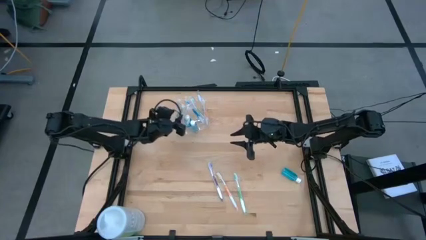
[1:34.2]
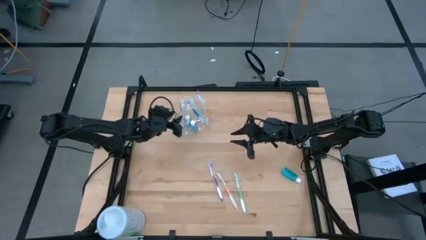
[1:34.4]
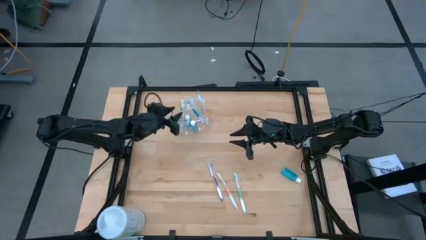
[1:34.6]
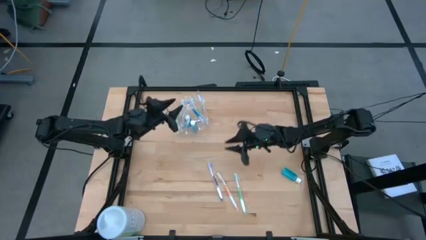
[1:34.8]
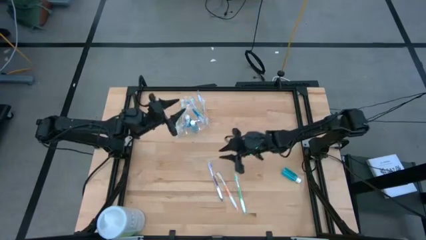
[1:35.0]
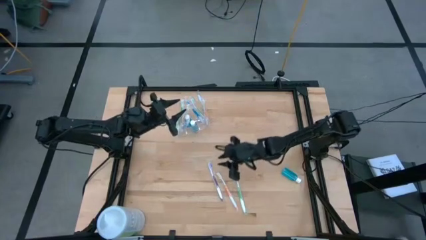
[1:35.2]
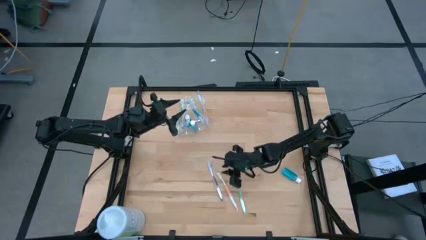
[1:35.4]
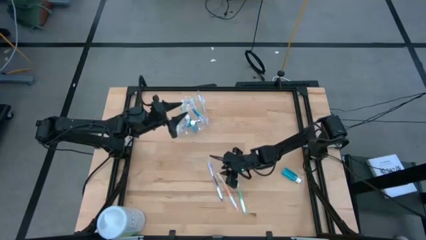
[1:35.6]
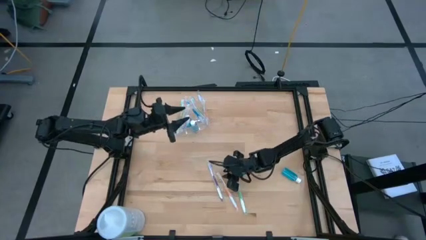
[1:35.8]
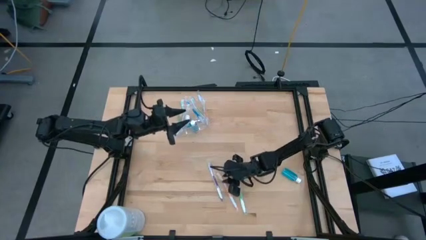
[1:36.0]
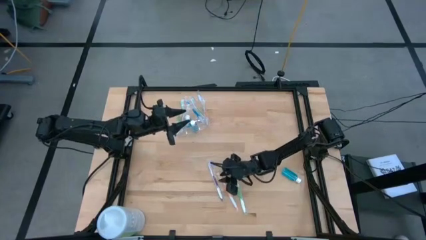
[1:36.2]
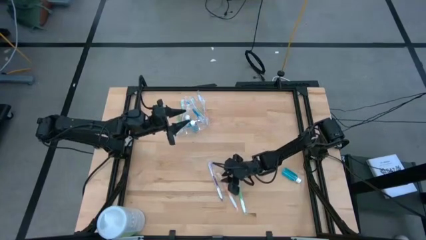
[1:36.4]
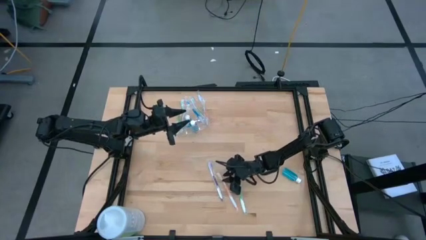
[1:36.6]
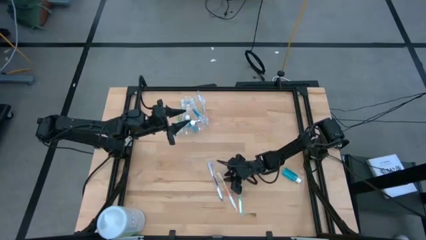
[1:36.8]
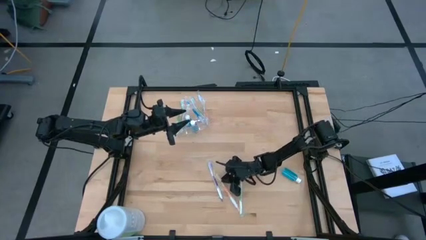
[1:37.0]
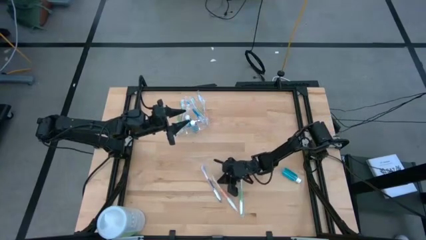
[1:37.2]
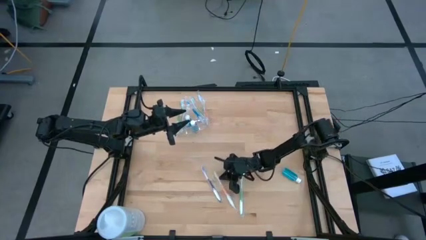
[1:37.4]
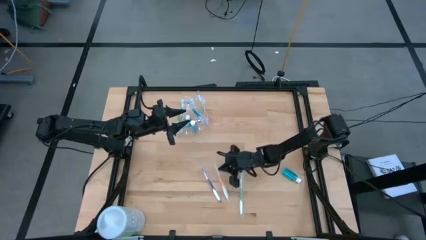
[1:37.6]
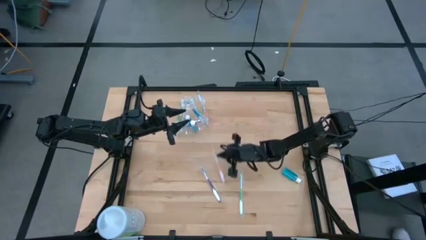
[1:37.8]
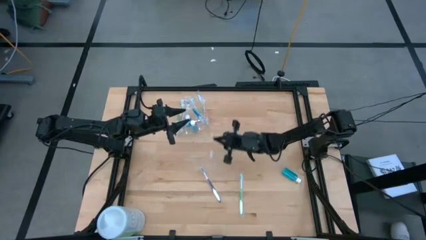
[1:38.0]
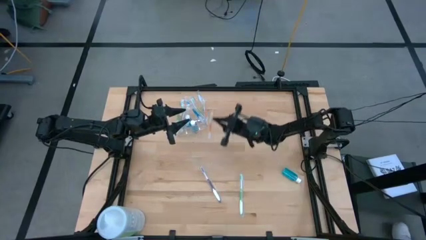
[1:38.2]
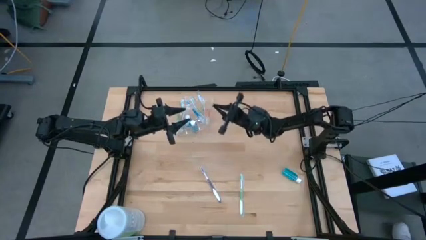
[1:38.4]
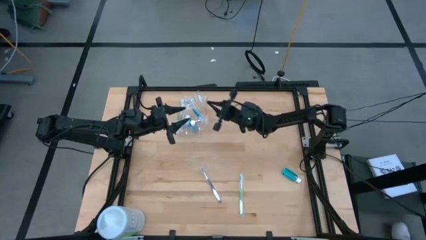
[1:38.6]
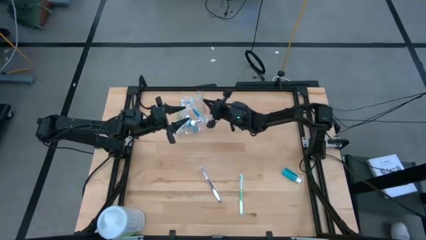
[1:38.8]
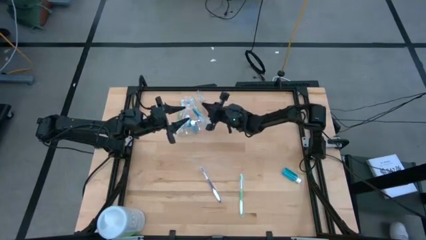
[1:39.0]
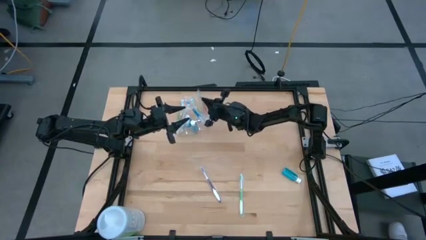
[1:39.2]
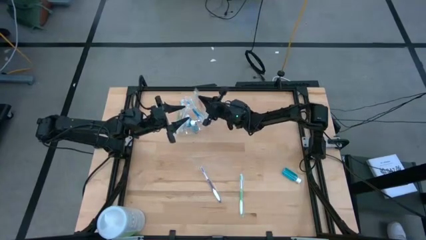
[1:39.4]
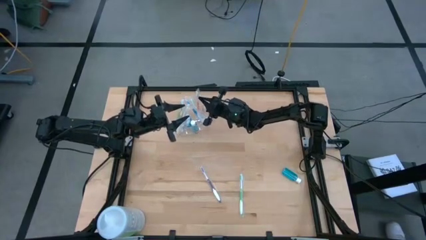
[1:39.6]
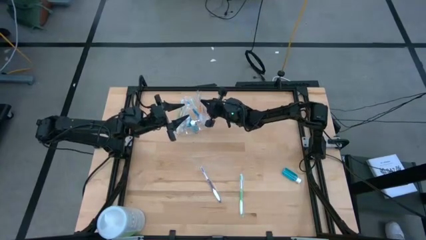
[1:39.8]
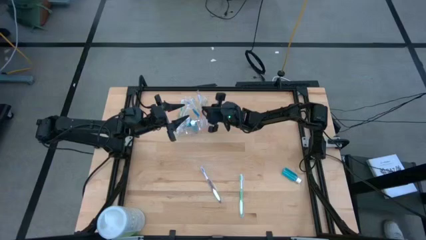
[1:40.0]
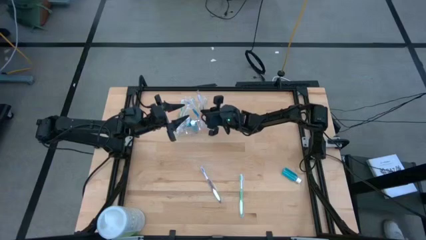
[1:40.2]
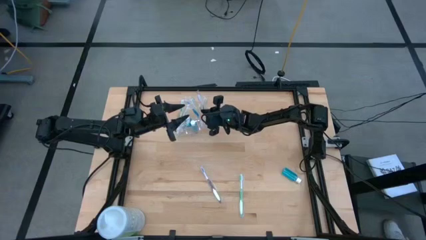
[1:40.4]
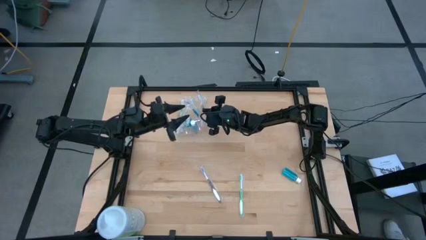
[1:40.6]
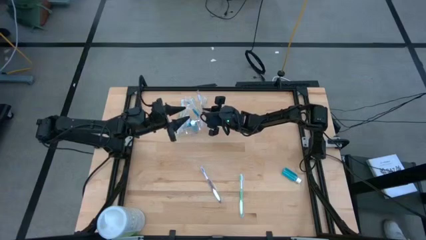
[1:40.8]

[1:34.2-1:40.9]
Task: Pick & Place toothbrushing station
Put the orange toothbrush into the transparent organizer

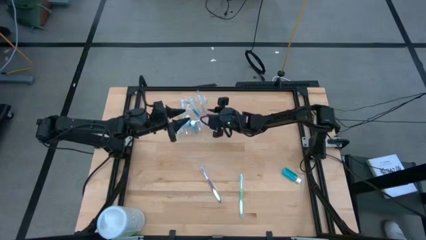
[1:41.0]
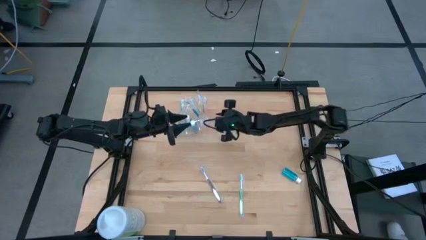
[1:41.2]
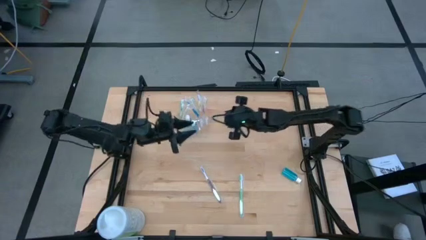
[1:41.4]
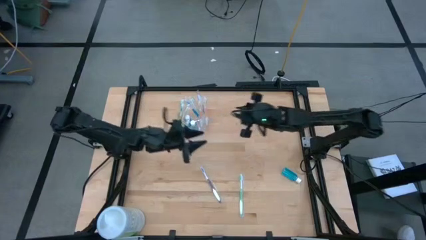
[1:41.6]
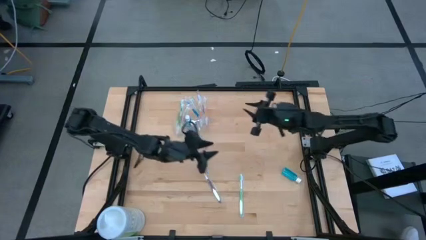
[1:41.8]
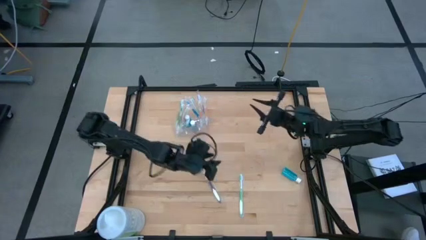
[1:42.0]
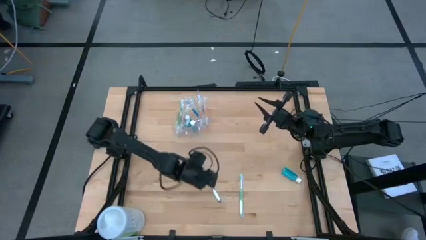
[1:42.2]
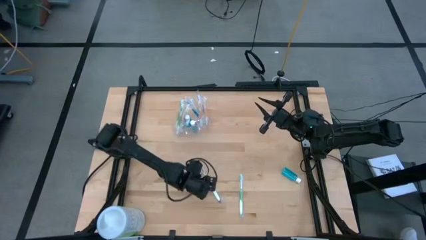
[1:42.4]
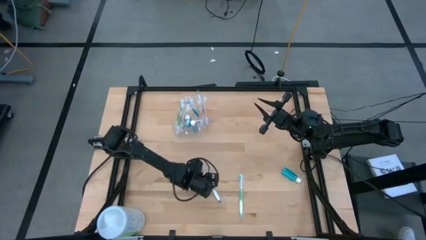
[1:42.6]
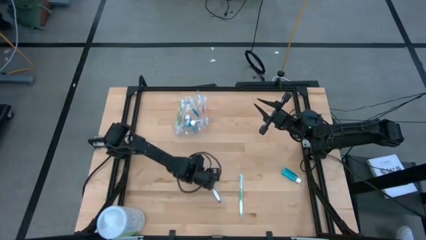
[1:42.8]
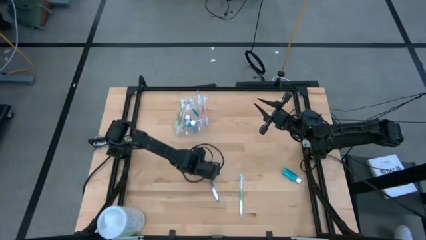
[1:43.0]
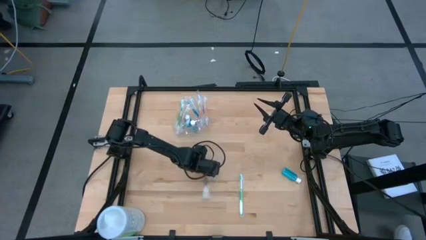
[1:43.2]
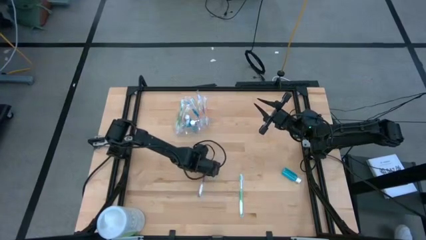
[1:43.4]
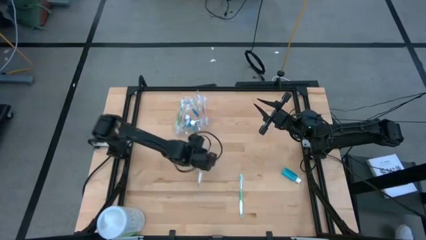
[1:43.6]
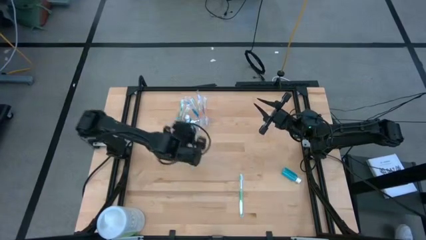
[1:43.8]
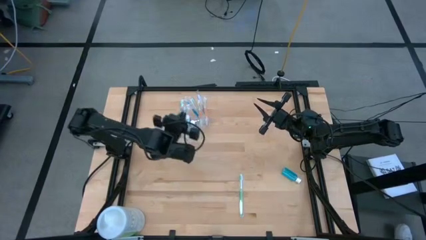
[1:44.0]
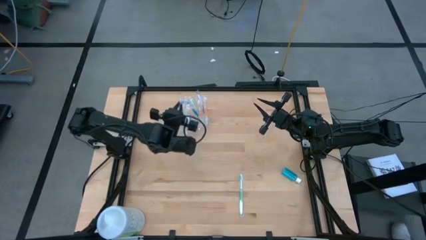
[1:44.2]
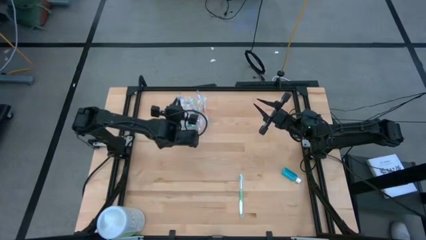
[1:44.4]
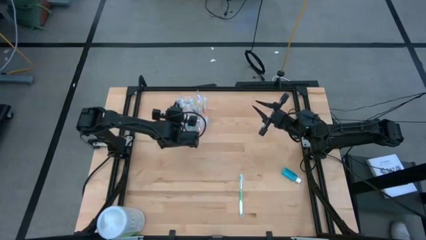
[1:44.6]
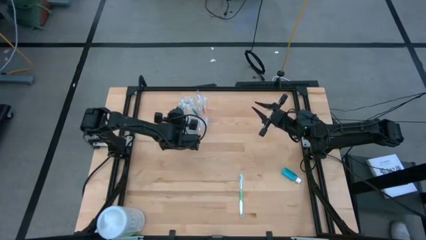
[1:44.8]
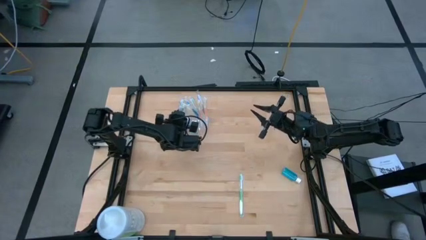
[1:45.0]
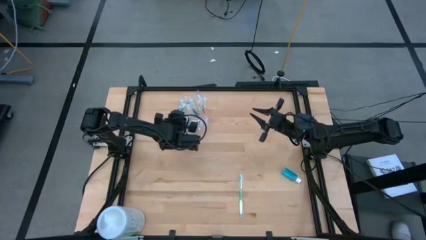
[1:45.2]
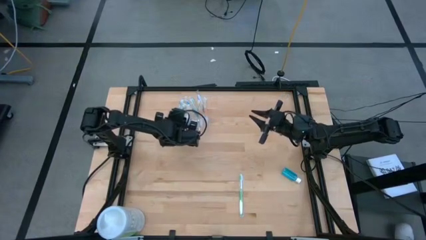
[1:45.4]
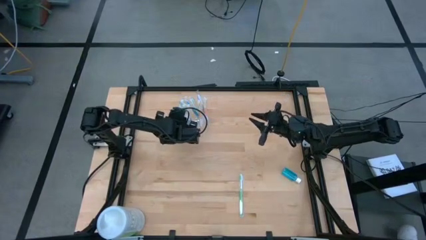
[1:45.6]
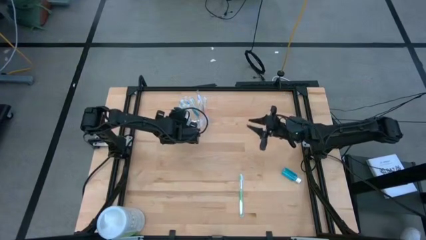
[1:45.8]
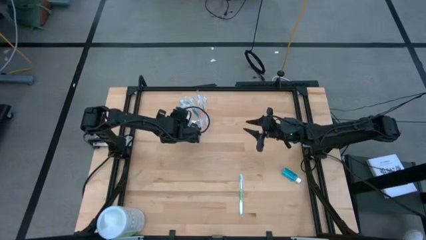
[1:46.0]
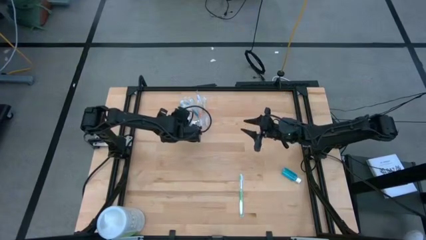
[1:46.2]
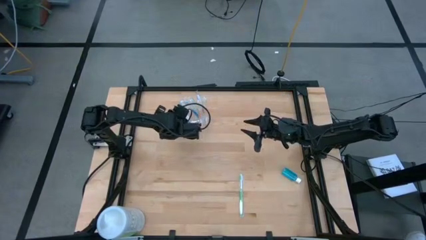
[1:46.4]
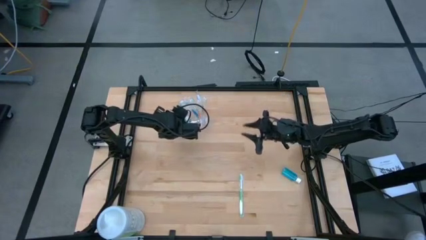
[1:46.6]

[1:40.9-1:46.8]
Put the violet toothbrush into the transparent organizer

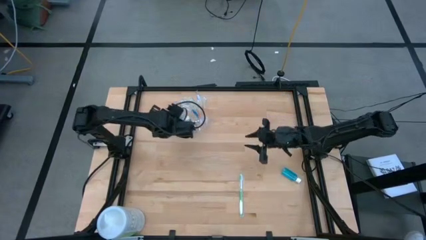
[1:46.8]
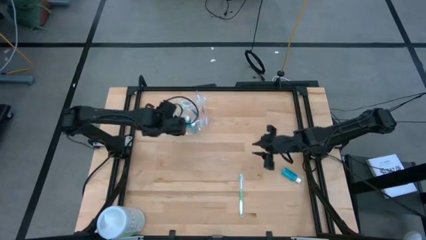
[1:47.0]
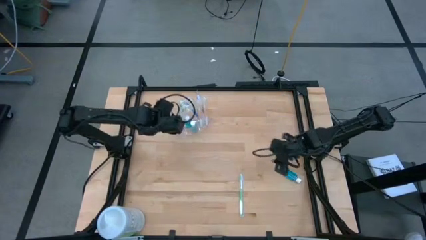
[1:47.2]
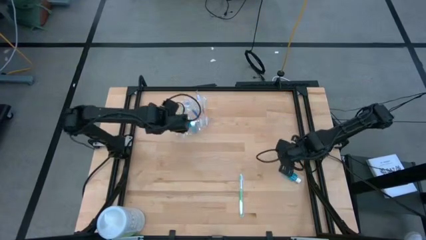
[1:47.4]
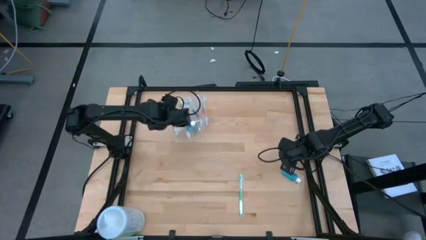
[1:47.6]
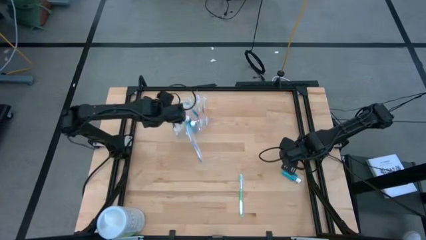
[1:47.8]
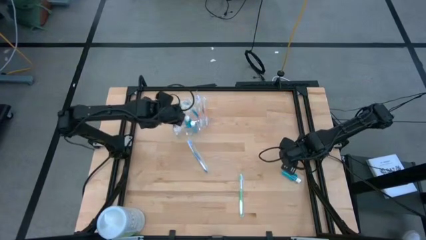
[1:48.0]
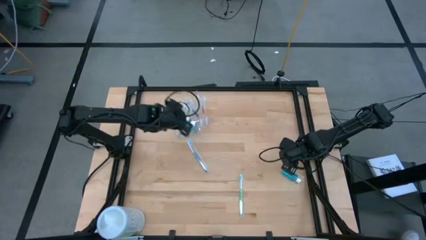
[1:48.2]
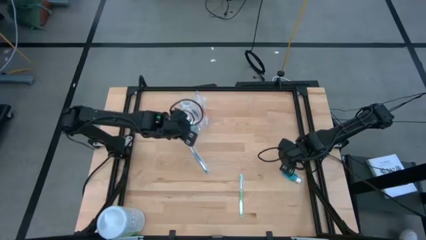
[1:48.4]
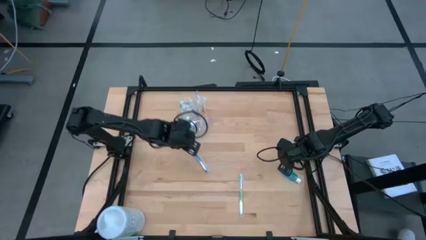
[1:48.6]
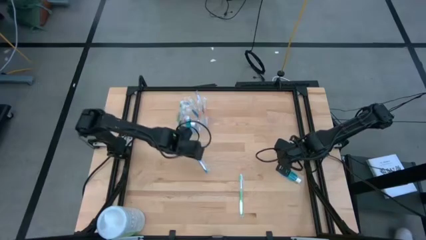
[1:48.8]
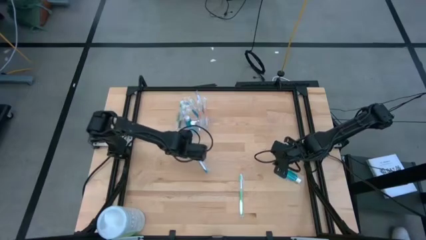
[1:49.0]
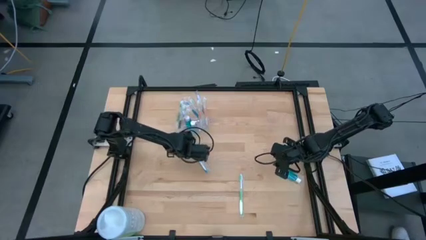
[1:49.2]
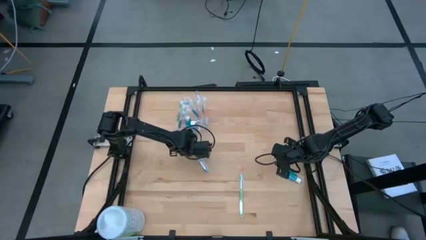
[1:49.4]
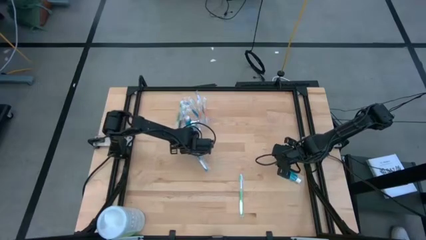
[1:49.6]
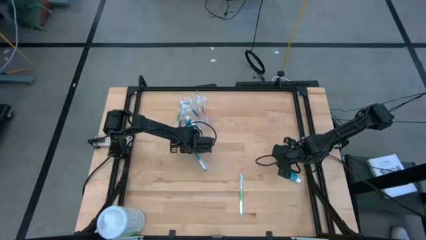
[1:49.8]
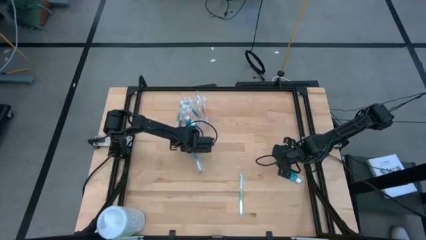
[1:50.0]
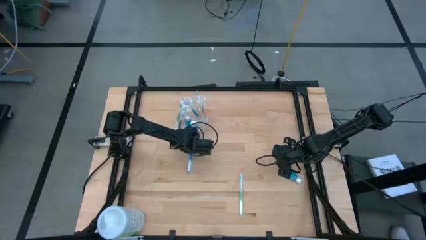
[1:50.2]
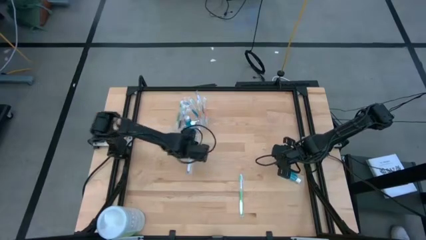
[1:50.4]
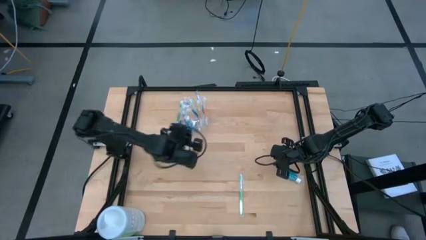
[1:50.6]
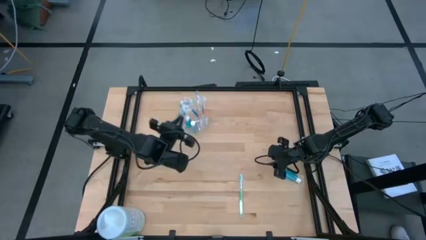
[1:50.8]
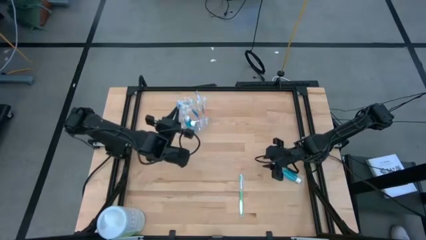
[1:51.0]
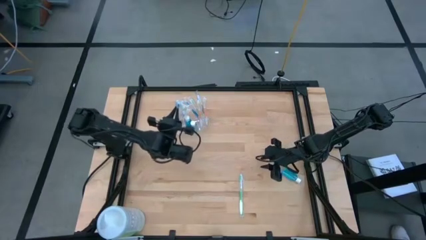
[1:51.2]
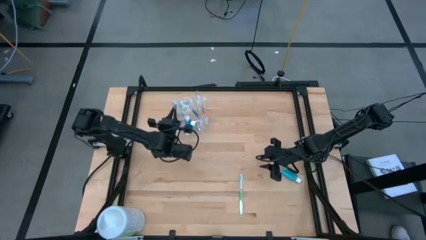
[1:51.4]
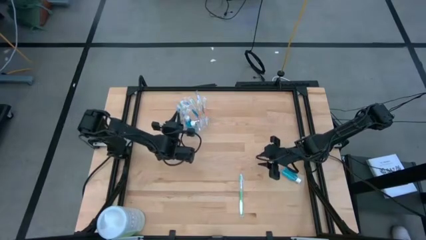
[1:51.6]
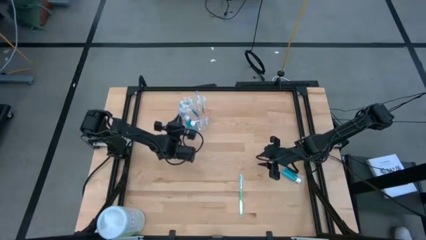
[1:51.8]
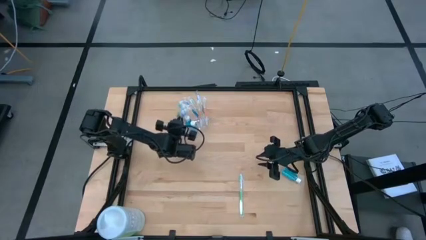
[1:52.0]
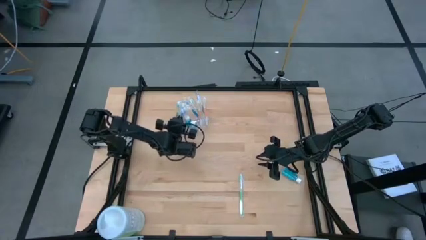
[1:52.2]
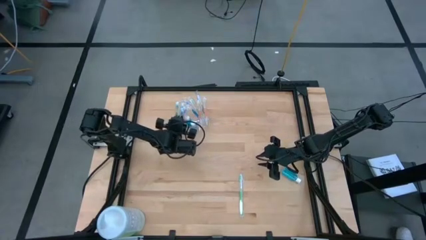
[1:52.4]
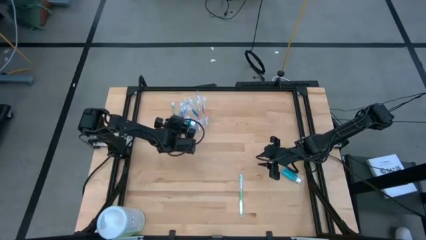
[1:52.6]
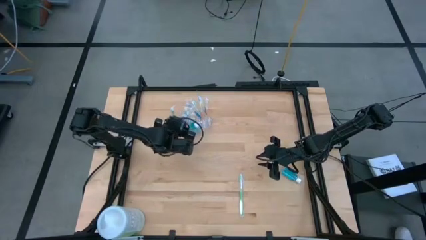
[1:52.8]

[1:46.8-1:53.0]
Put the blue toothbrush into the transparent organizer
